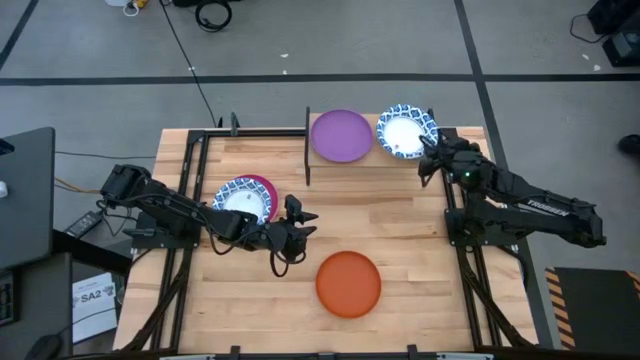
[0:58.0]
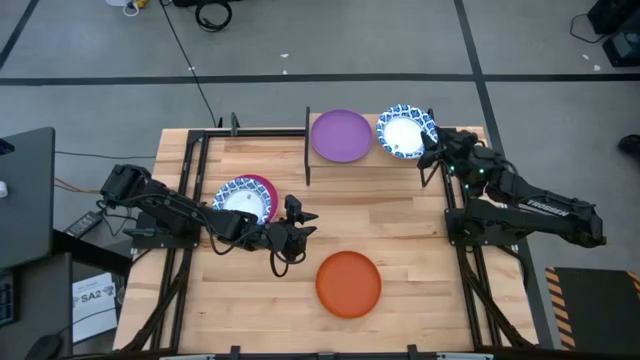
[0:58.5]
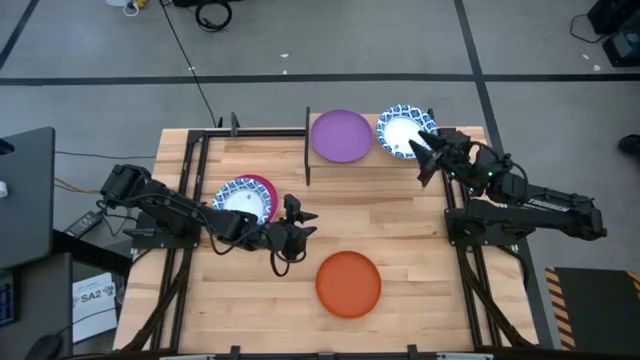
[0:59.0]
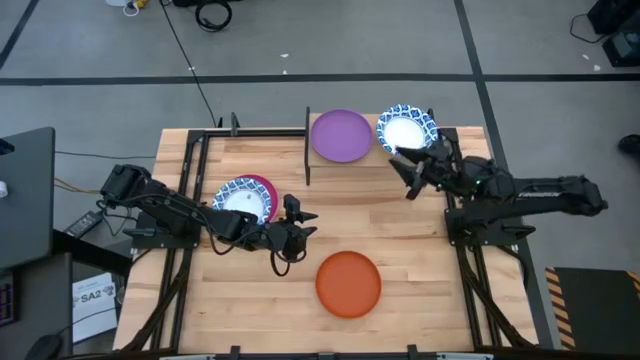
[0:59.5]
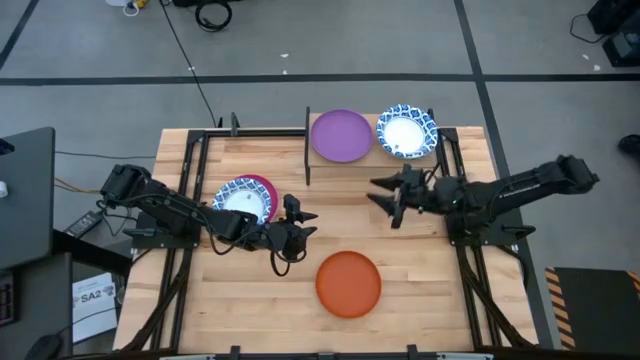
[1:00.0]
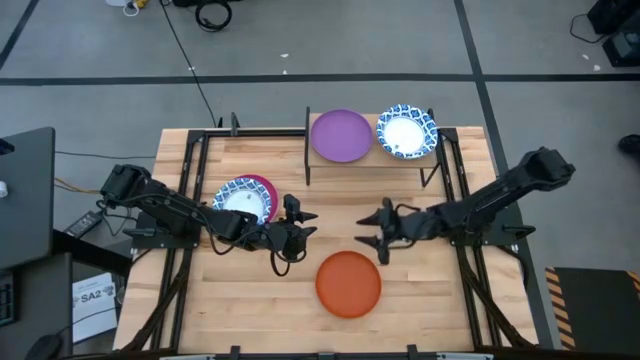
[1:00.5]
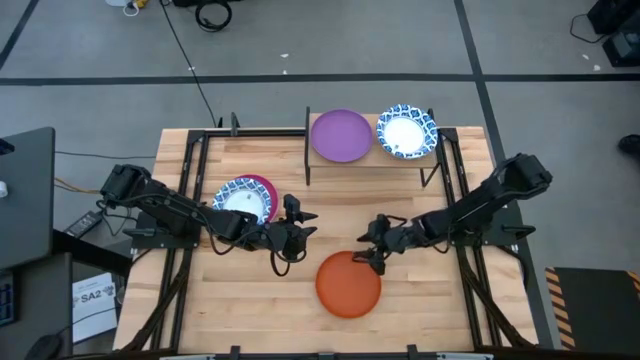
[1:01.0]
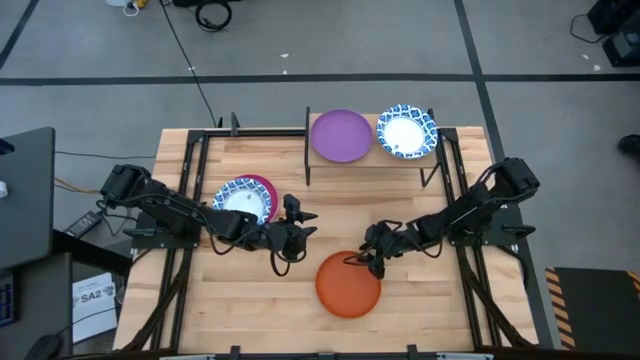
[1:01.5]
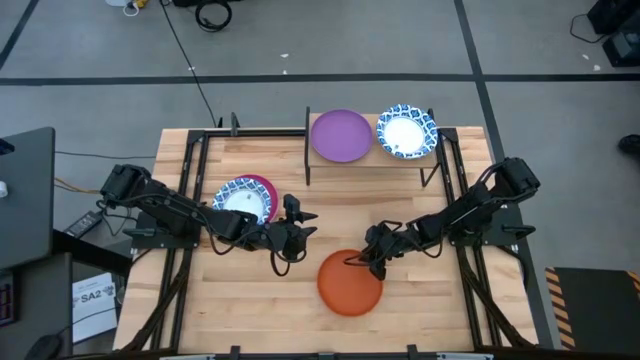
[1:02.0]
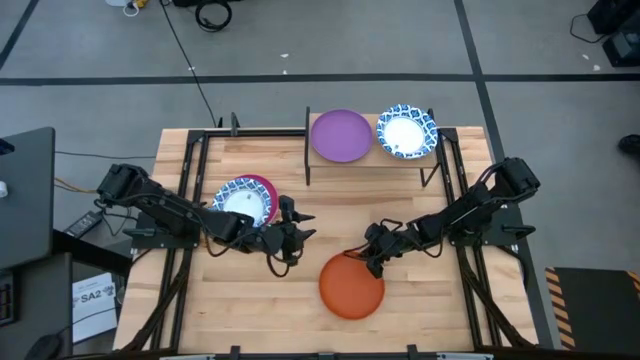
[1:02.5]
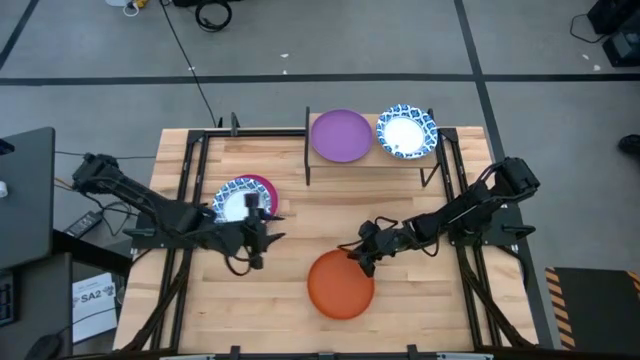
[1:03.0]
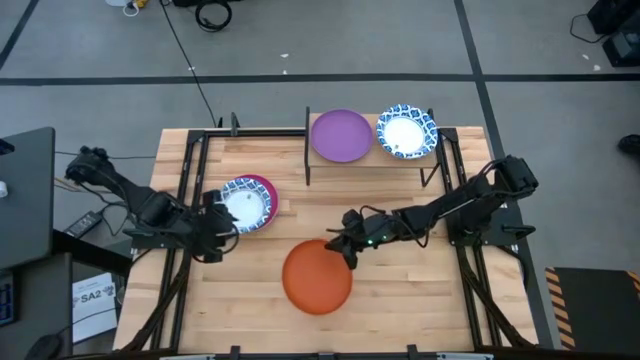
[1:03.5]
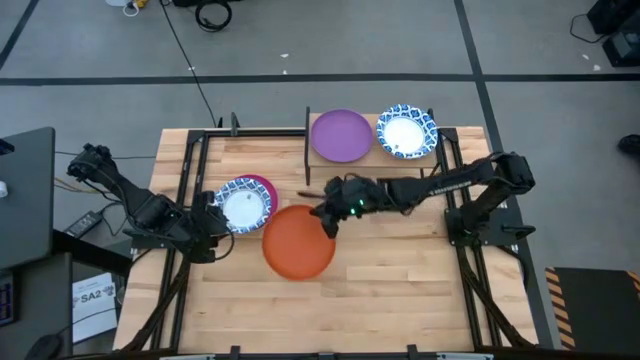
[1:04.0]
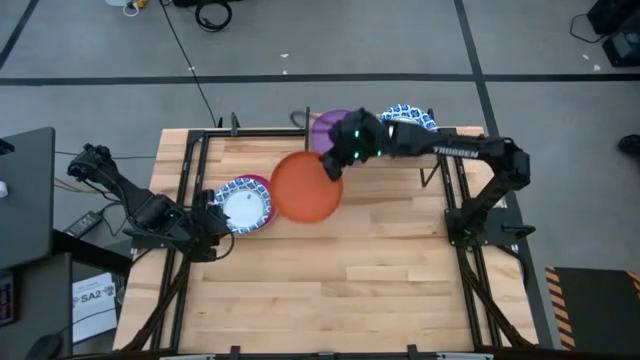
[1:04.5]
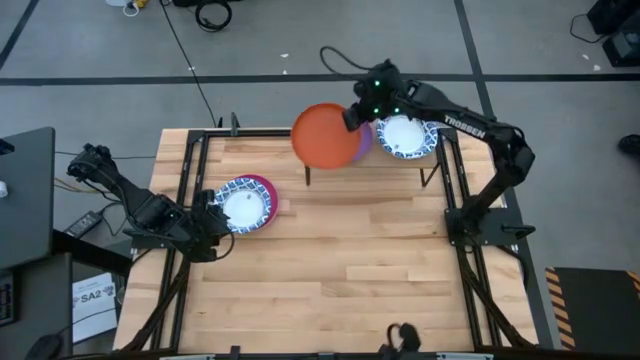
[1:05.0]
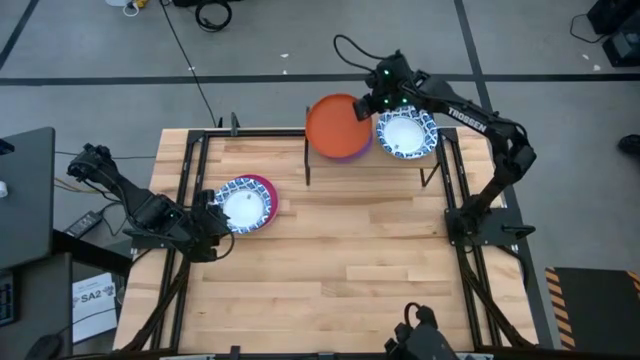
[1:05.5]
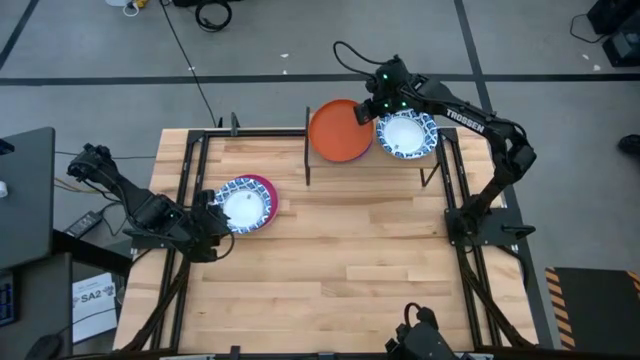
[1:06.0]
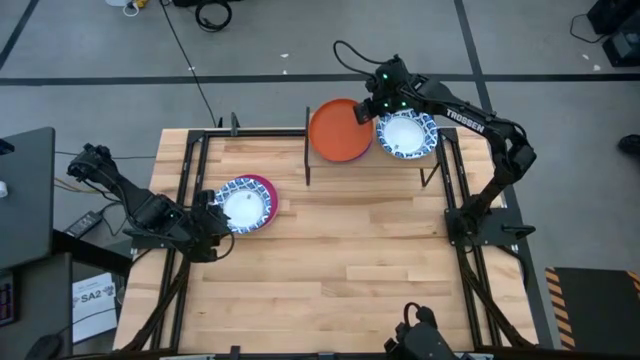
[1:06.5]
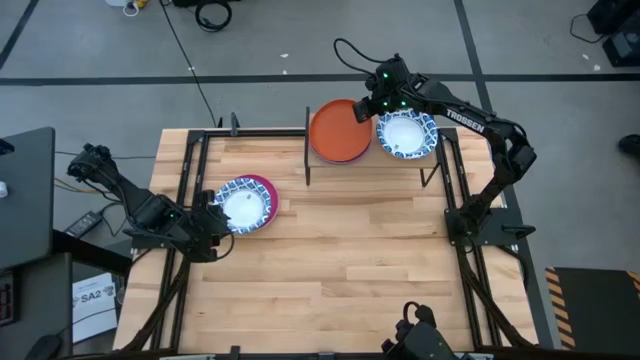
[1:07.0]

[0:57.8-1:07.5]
Task: Place and stack plates onto a shelf
Stack the orange plate on top of the violet plate on the shelf

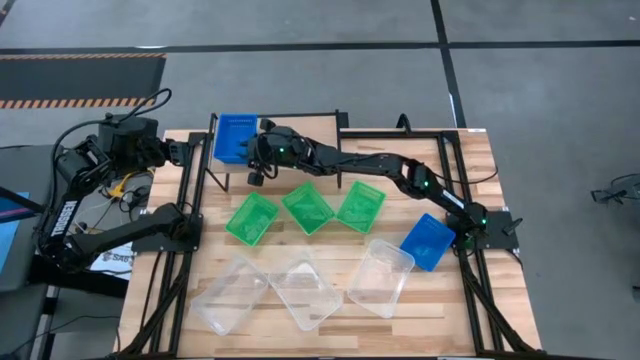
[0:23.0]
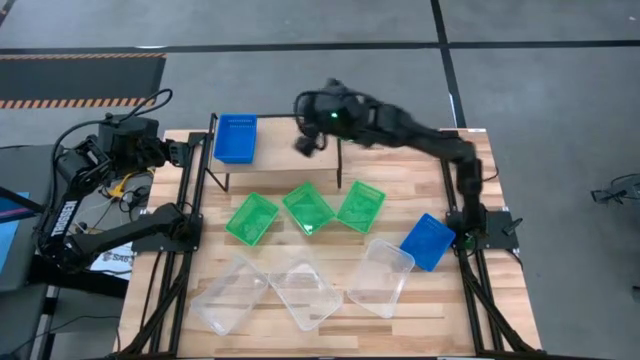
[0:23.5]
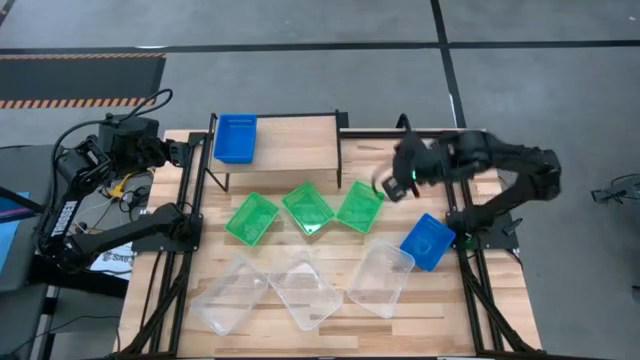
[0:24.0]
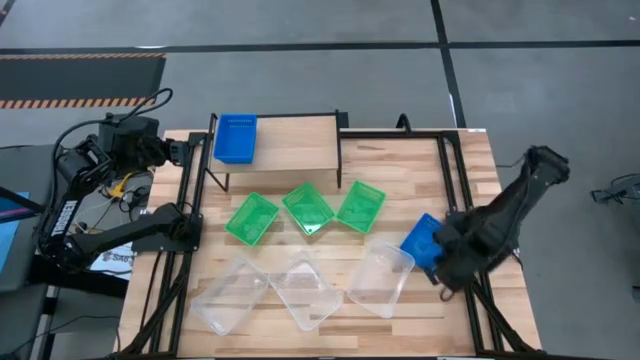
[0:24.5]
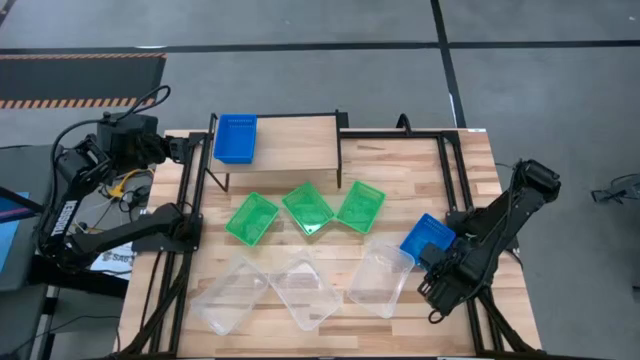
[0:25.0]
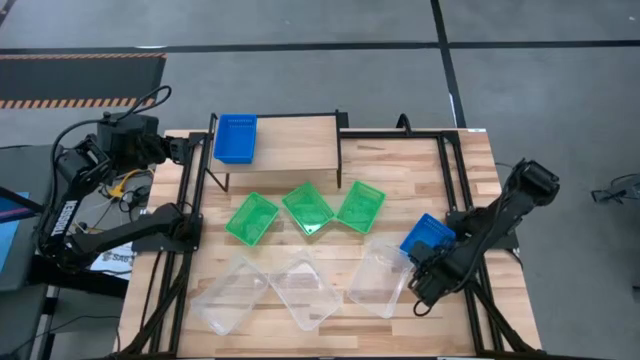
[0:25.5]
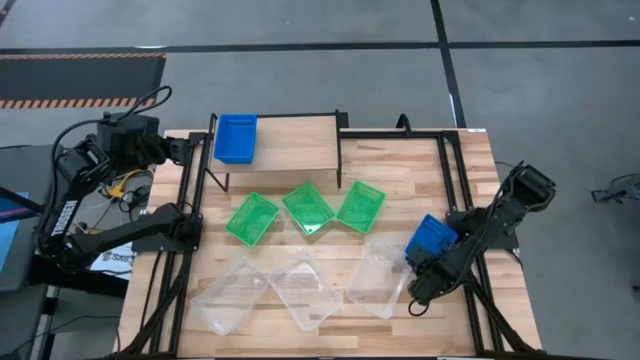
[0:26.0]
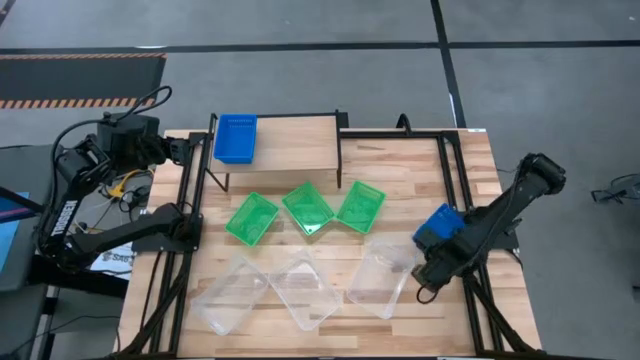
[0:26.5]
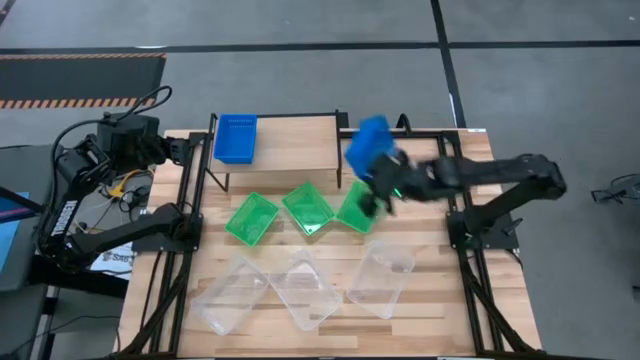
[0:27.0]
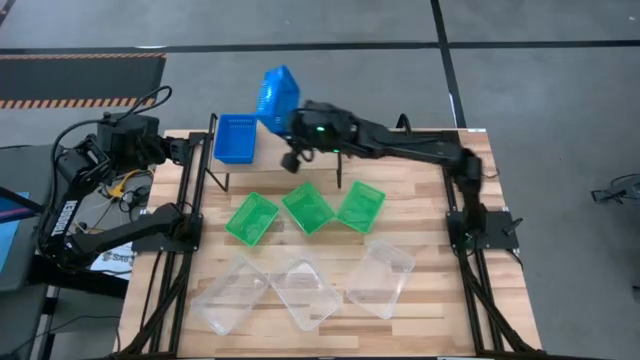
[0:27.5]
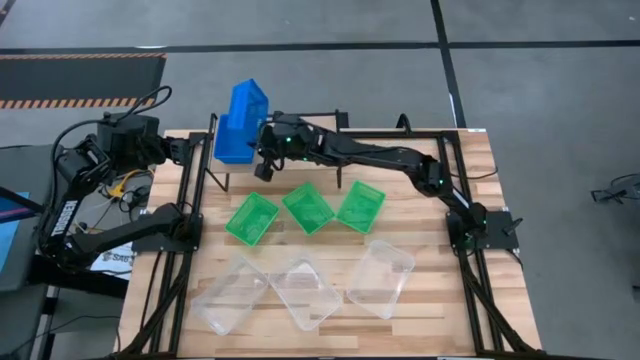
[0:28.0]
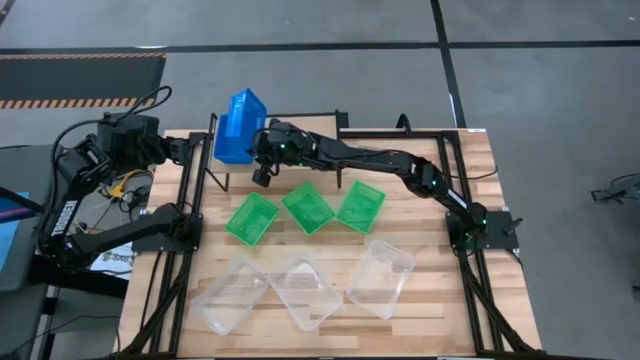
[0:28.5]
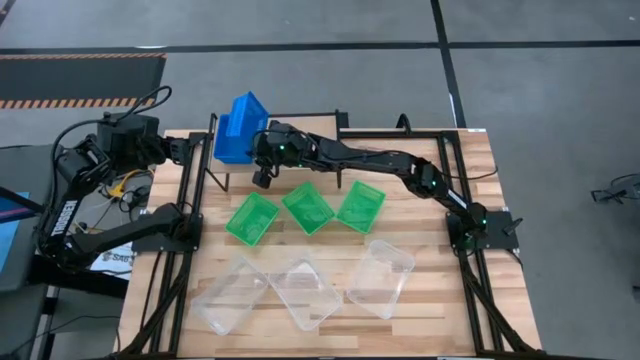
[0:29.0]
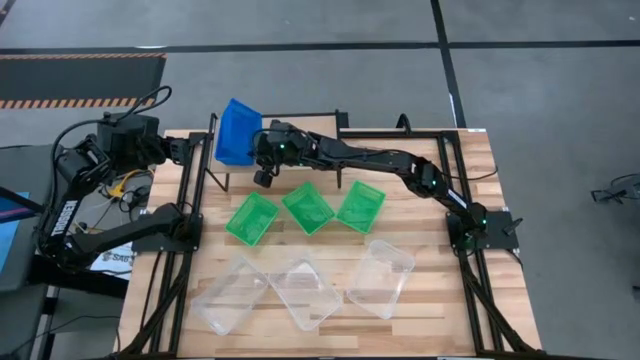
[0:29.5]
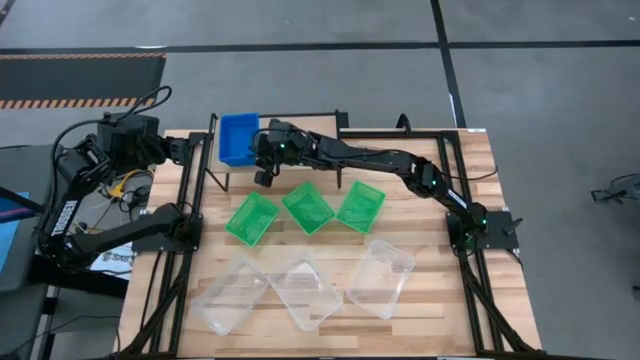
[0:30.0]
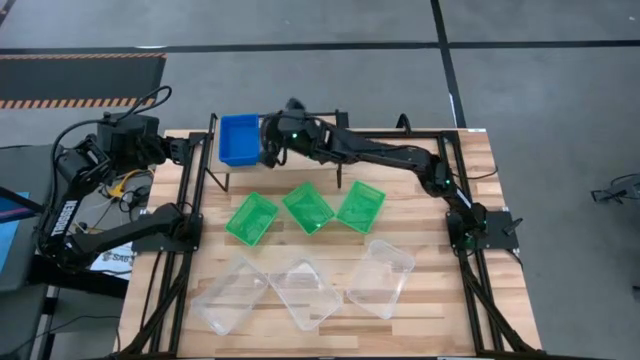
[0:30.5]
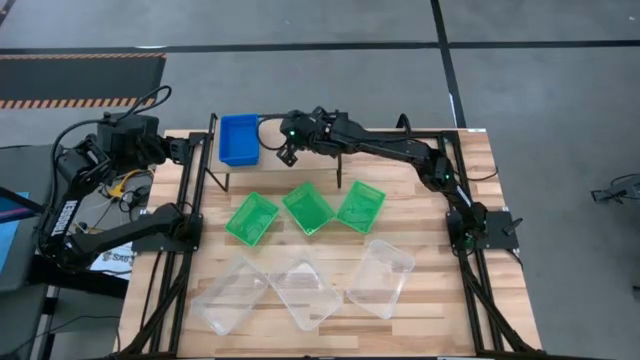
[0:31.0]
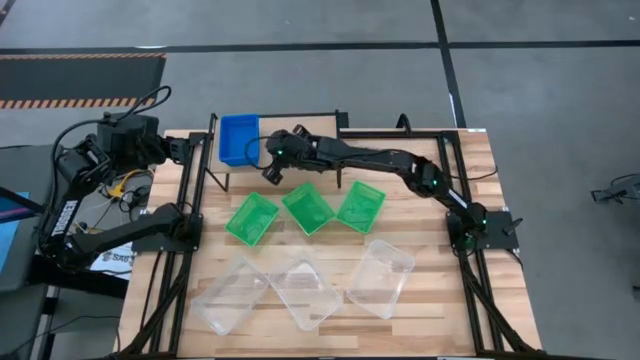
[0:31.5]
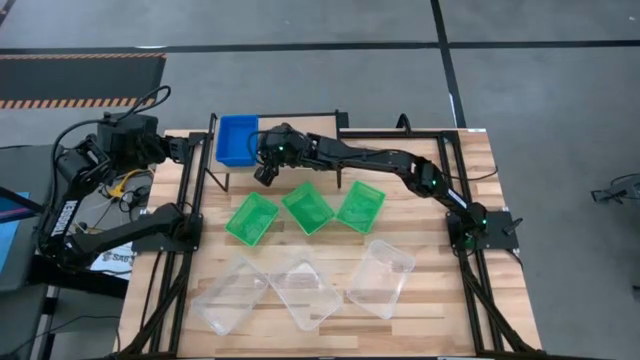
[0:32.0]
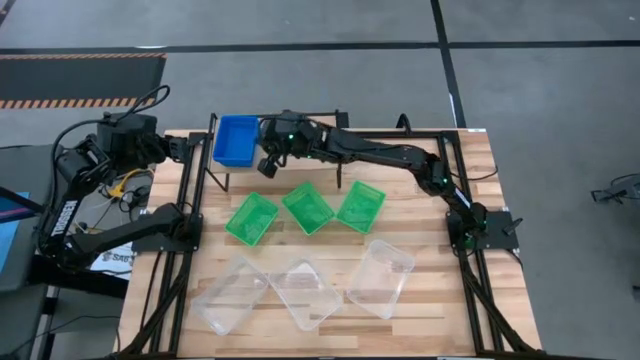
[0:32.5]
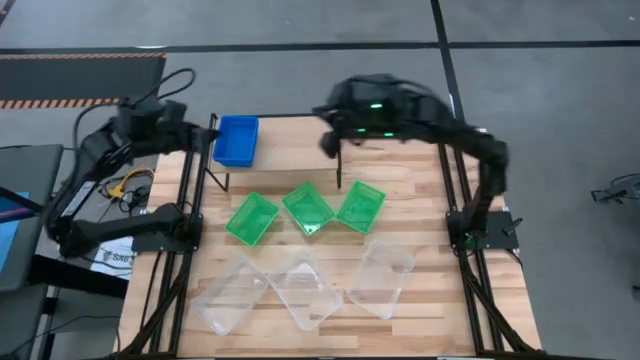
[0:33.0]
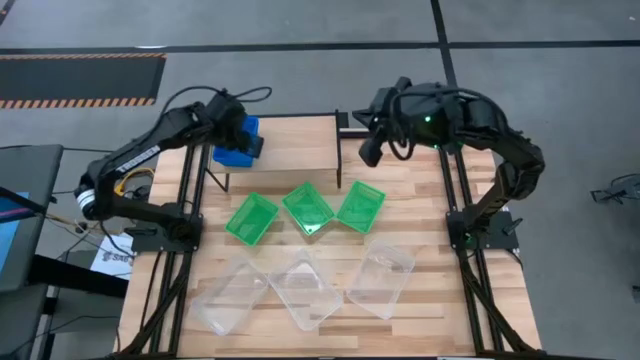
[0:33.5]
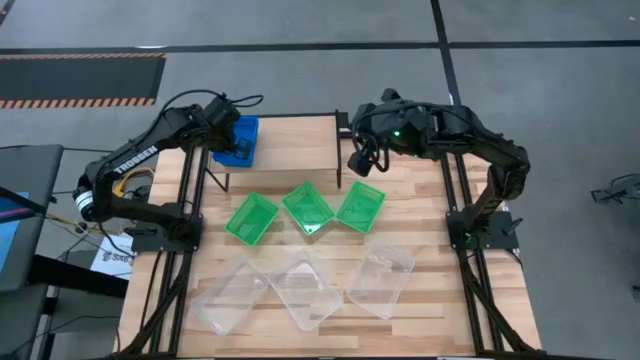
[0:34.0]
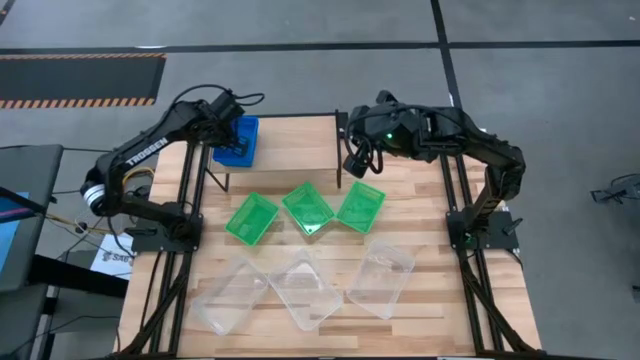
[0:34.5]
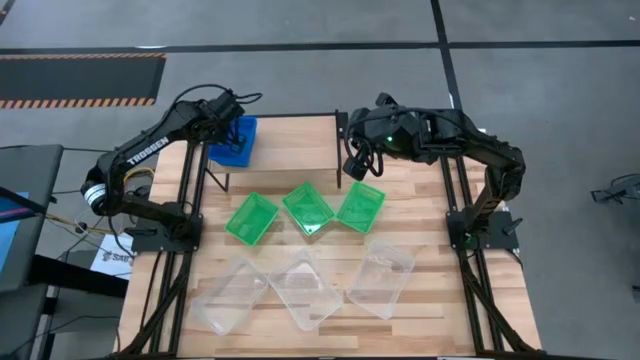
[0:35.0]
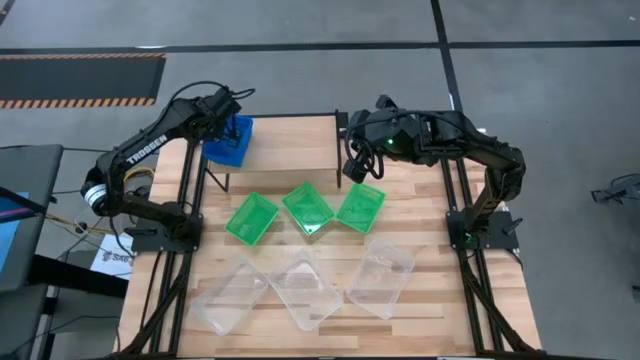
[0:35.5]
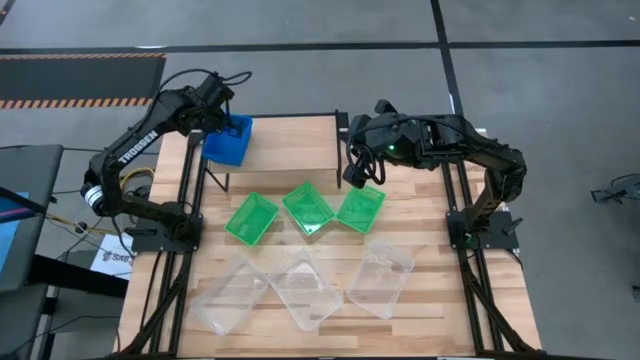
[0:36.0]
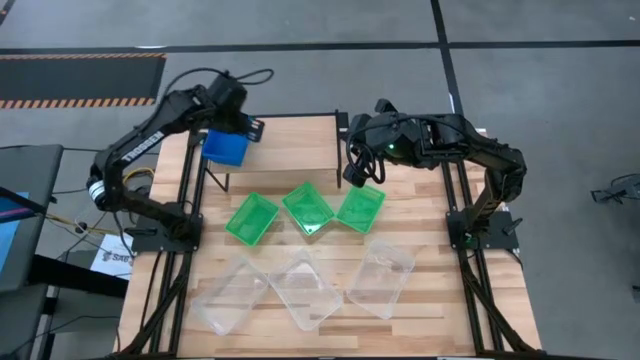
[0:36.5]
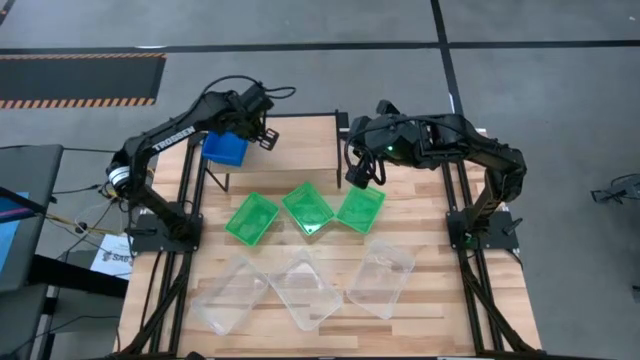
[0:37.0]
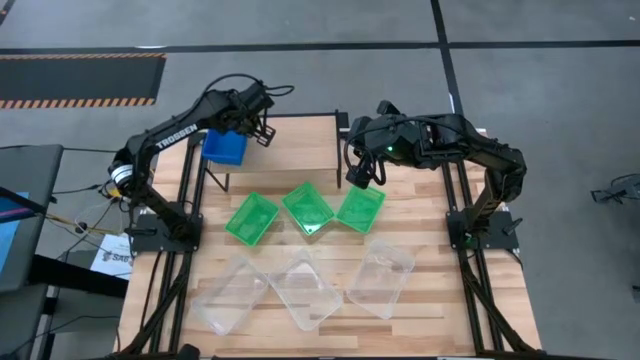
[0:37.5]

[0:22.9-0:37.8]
Task: Stack baskets on shelf by color
Stack the blue bin on top of the other blue bins on the shelf
